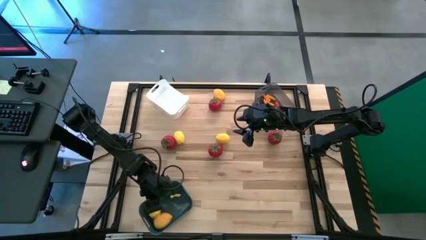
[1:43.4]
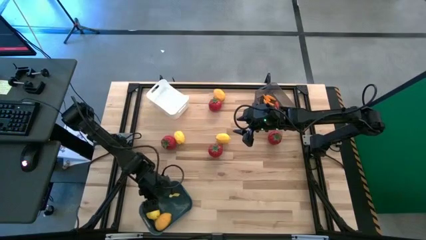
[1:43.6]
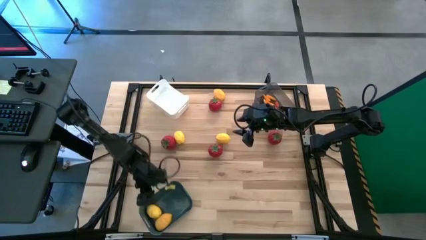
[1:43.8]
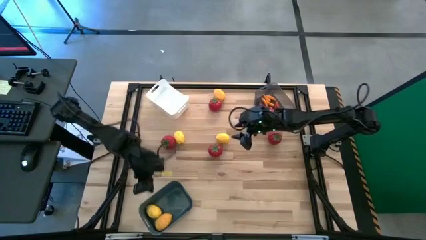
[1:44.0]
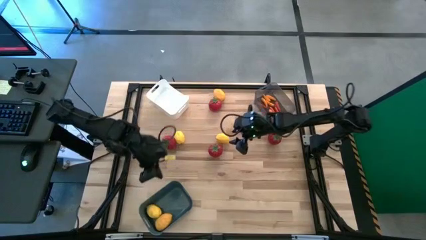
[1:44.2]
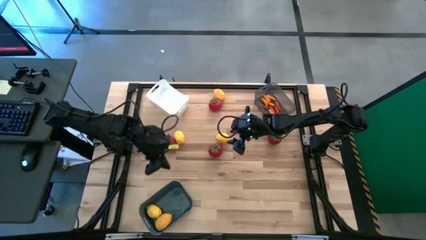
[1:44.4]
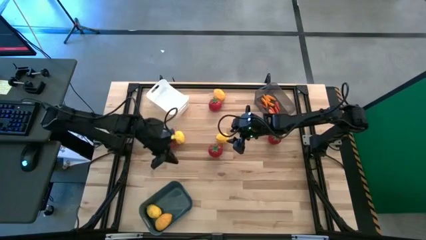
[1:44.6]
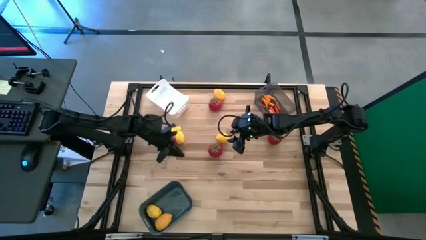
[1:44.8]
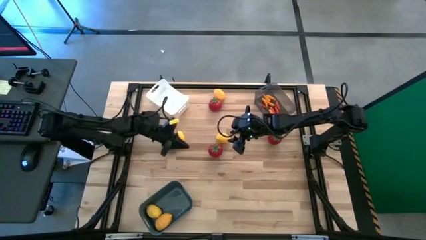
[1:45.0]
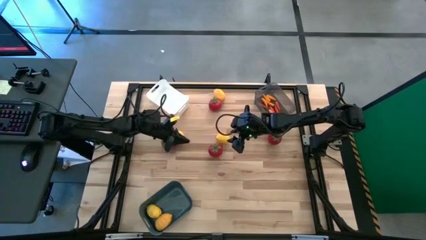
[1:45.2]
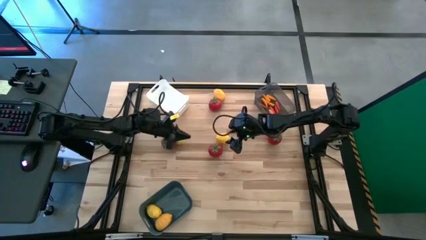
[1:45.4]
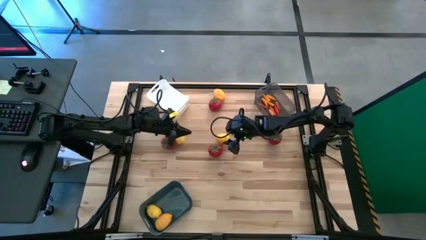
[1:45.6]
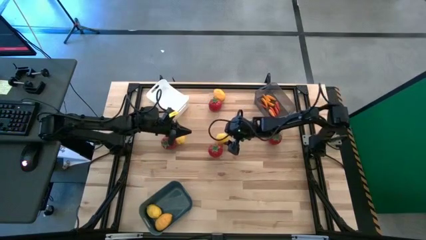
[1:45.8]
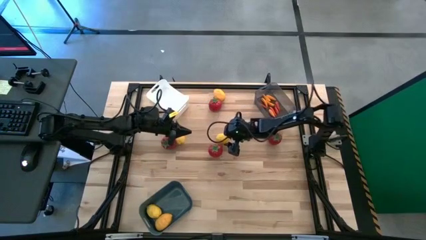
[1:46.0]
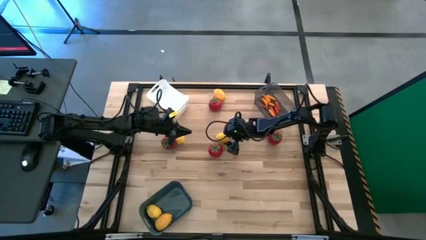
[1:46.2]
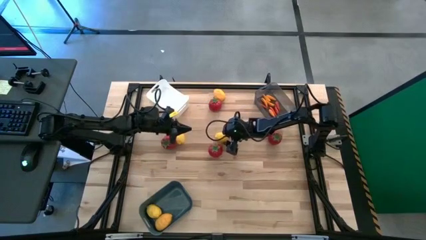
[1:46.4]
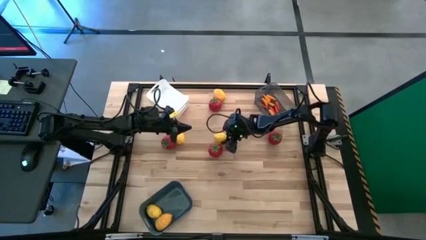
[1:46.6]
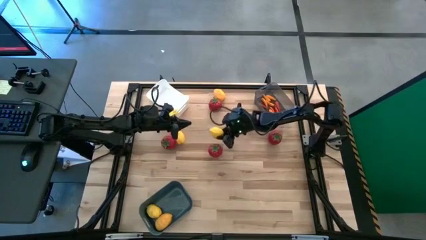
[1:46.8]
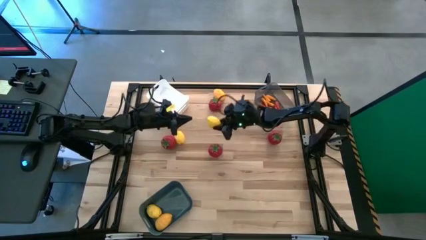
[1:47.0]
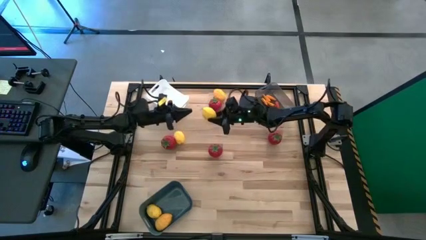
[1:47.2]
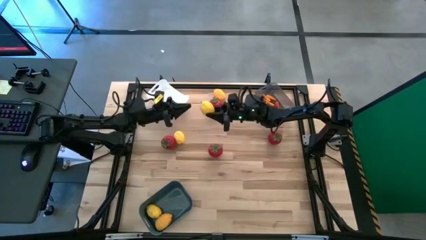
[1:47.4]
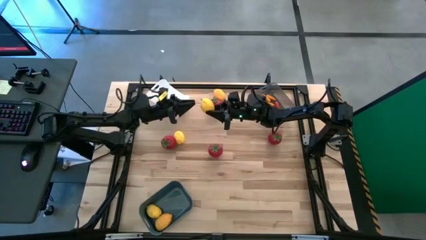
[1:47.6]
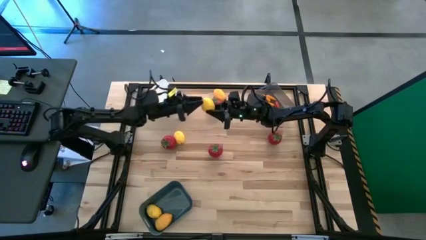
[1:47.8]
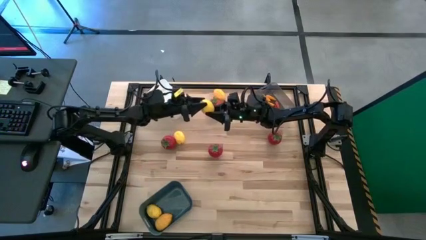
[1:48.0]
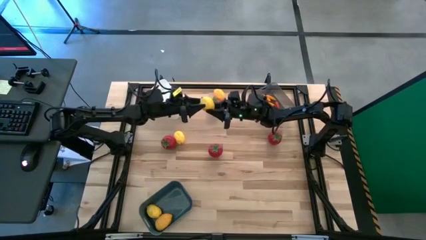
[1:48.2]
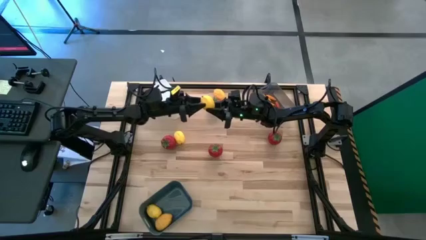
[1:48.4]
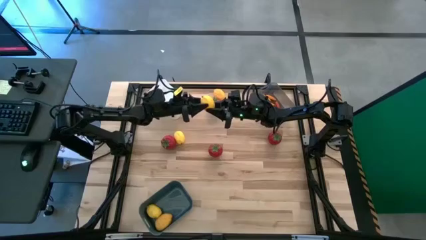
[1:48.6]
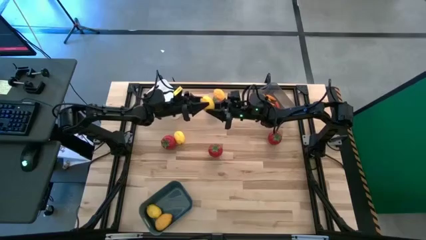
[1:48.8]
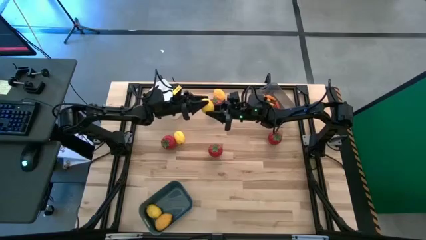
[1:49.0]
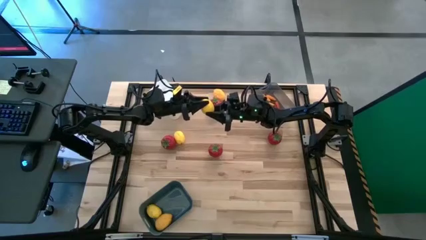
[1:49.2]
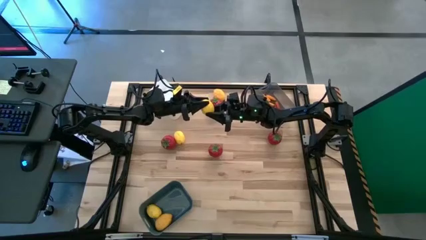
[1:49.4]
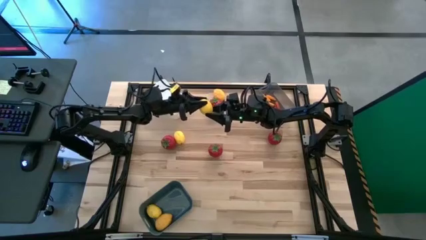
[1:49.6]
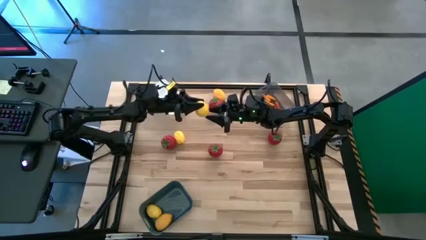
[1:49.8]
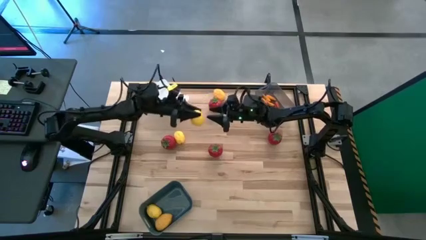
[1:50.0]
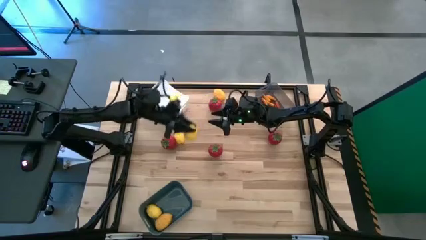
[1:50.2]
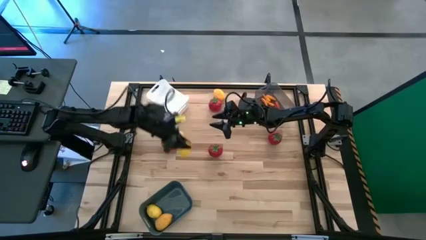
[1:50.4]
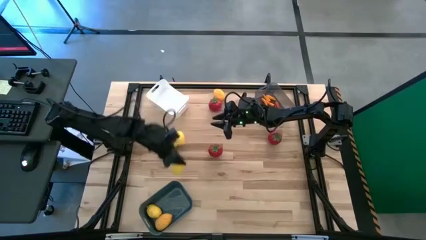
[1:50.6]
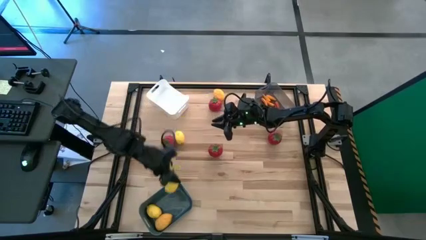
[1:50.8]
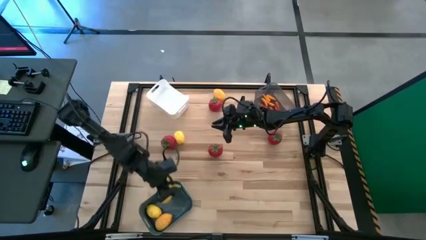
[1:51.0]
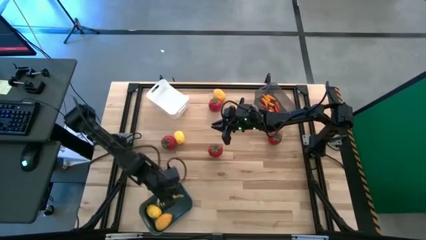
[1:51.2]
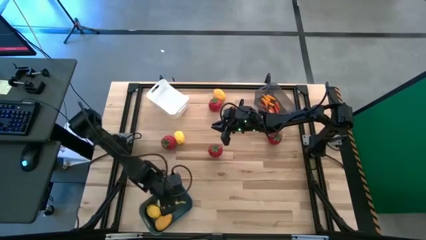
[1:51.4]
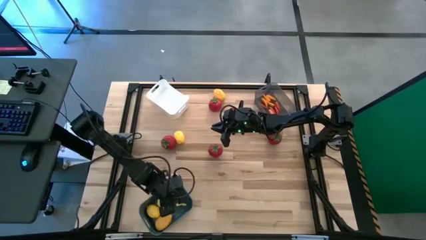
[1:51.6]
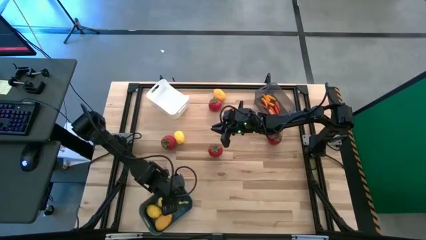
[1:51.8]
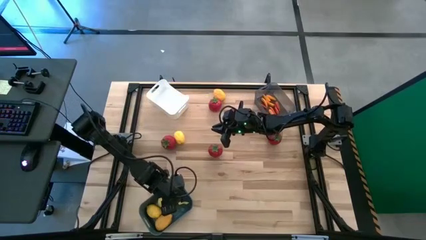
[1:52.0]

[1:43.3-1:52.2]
Task: Sort produce into baskets
Put the lemon into the blue bin

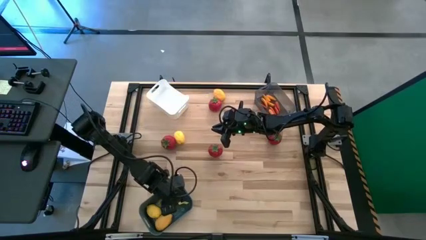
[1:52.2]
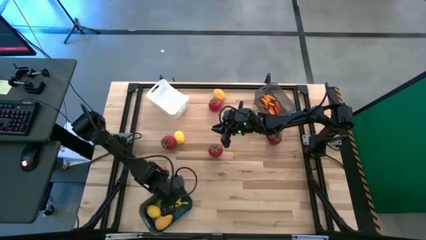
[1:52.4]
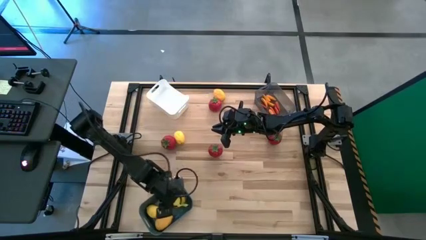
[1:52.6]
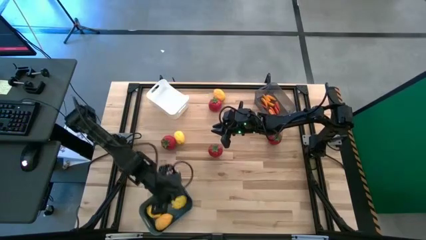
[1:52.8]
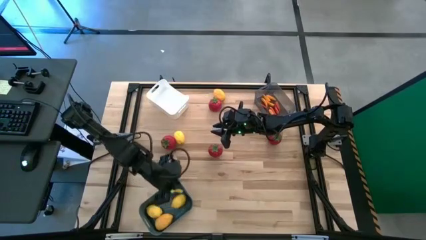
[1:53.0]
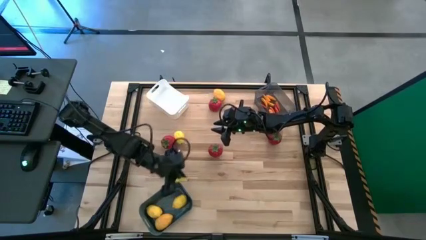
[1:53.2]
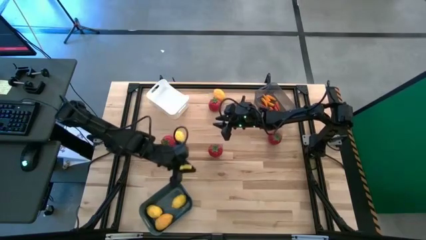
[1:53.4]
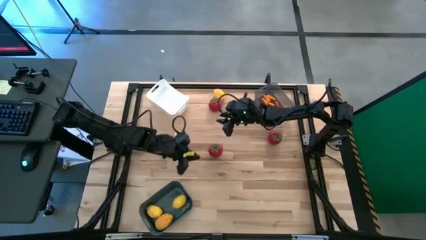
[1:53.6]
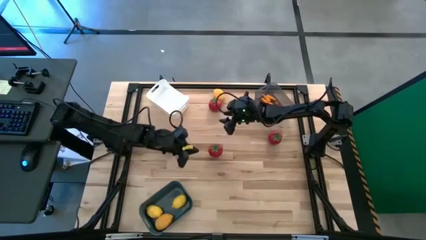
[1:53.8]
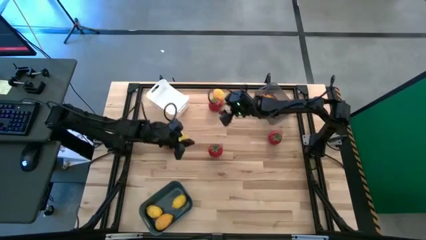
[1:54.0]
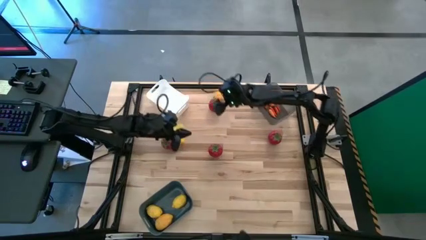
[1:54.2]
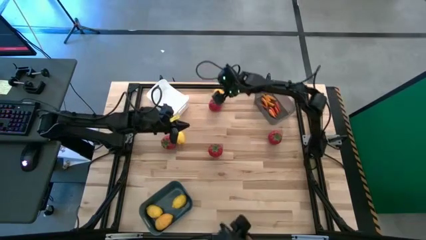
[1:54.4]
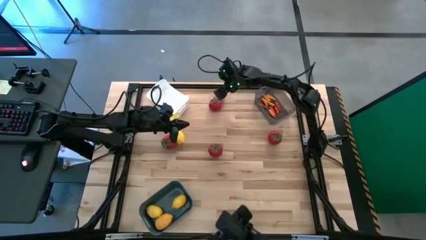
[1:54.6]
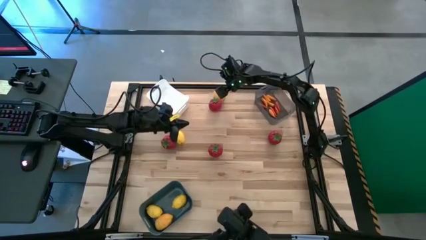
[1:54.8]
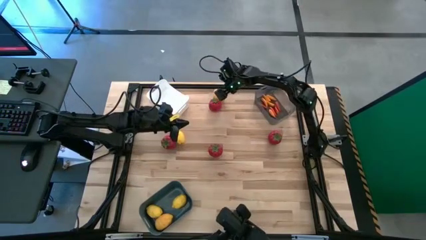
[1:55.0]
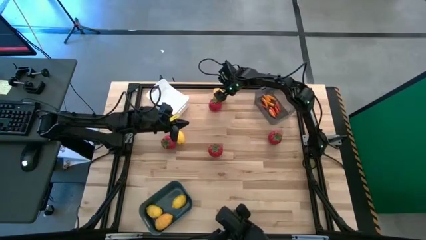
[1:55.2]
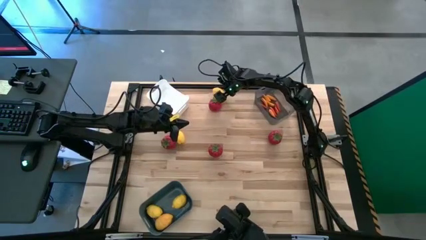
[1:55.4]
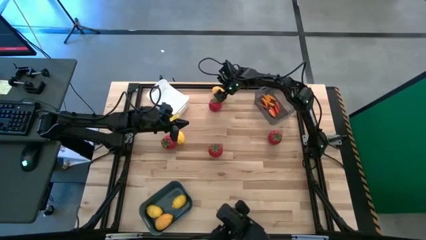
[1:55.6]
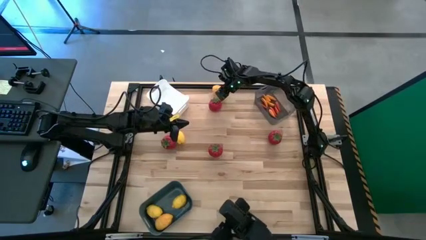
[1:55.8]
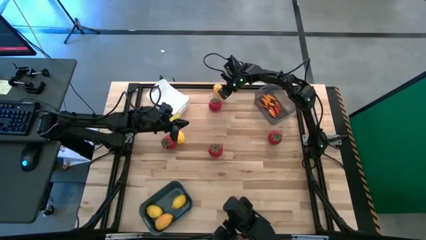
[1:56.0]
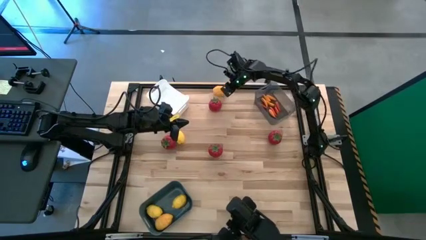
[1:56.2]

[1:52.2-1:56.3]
Put the lemon into the blue bin
